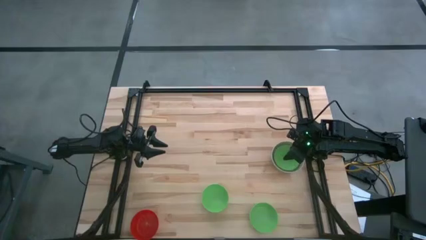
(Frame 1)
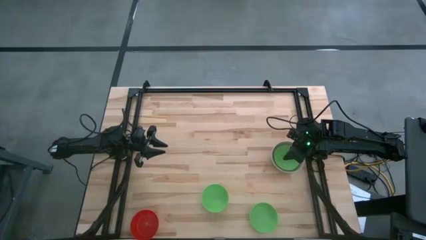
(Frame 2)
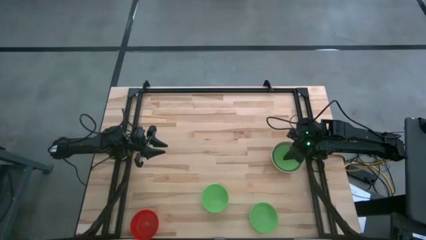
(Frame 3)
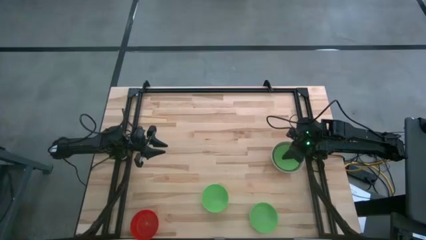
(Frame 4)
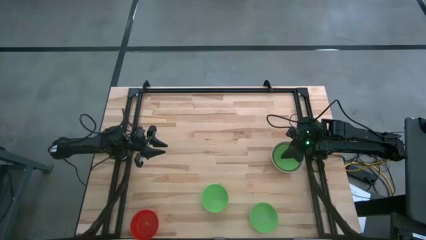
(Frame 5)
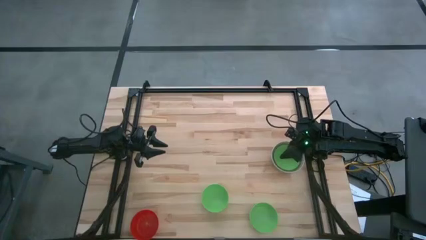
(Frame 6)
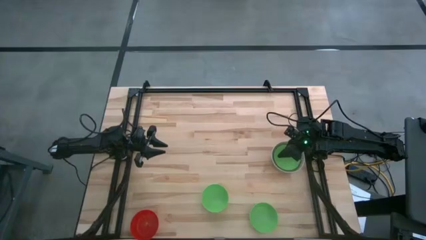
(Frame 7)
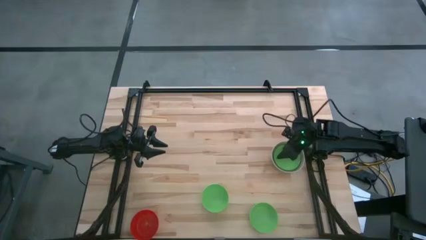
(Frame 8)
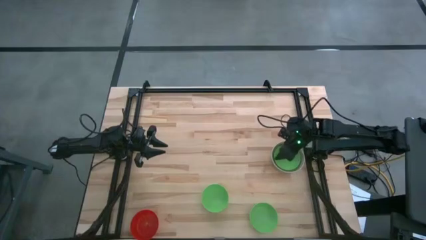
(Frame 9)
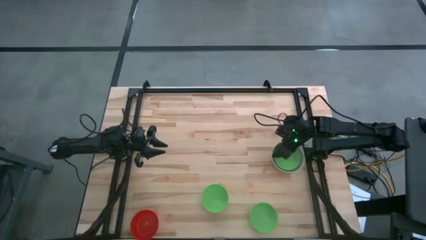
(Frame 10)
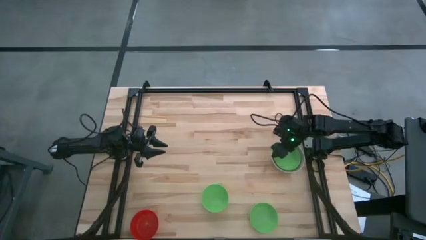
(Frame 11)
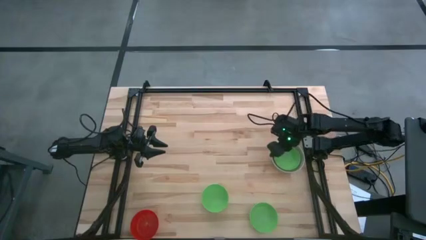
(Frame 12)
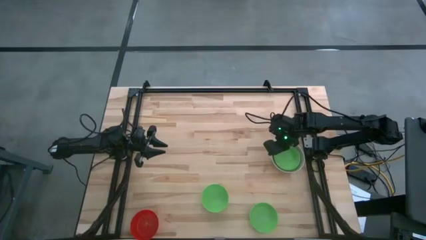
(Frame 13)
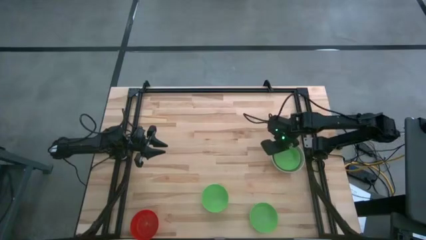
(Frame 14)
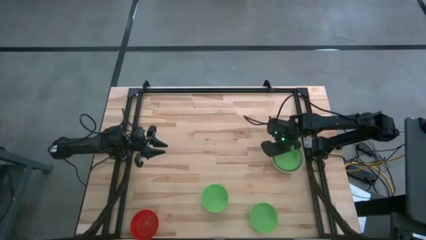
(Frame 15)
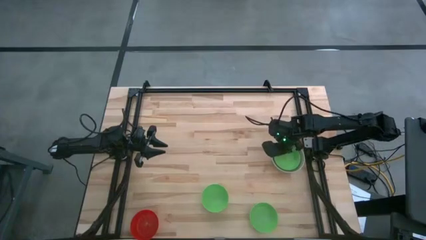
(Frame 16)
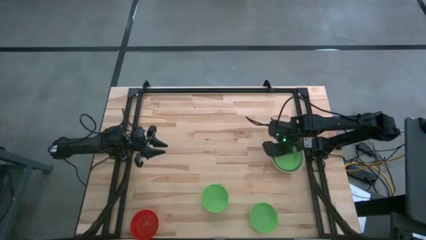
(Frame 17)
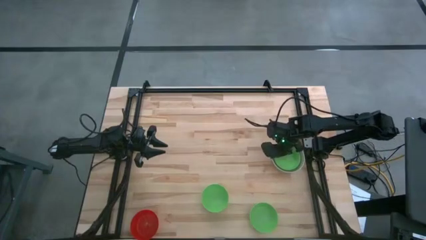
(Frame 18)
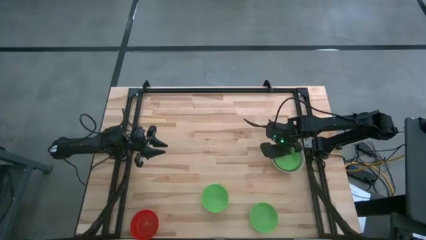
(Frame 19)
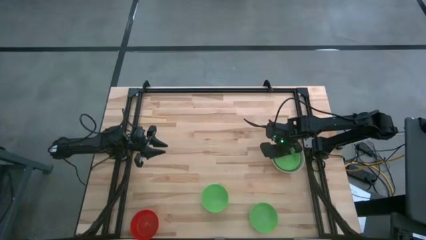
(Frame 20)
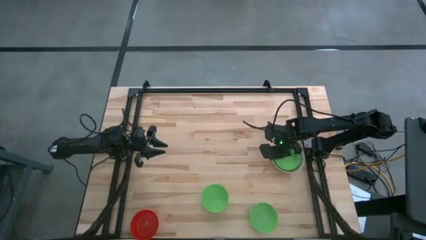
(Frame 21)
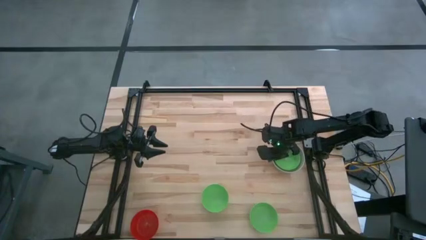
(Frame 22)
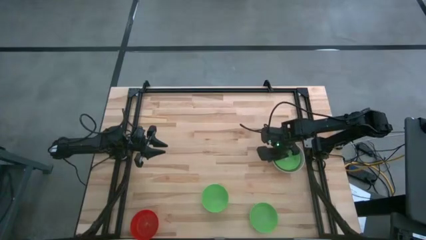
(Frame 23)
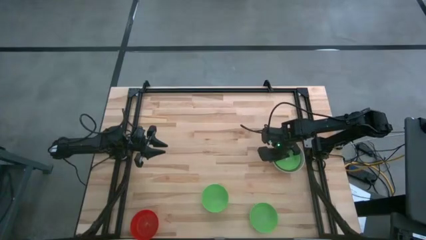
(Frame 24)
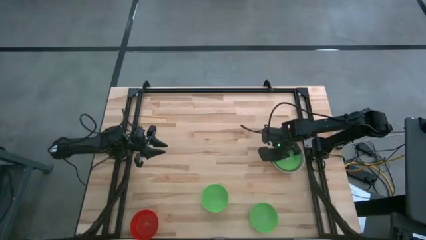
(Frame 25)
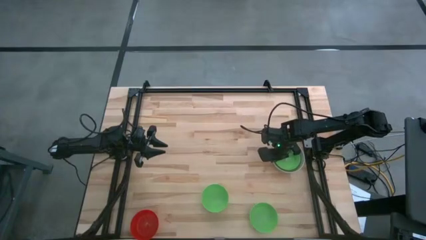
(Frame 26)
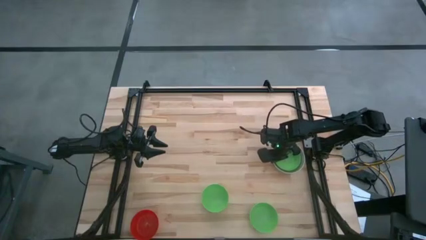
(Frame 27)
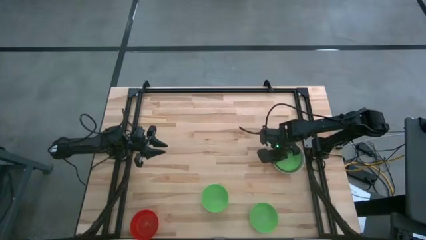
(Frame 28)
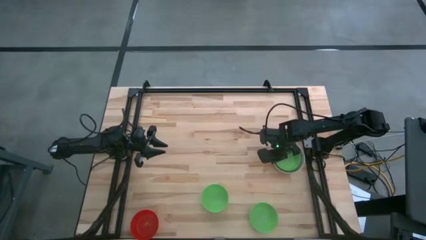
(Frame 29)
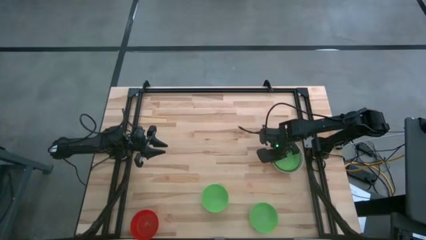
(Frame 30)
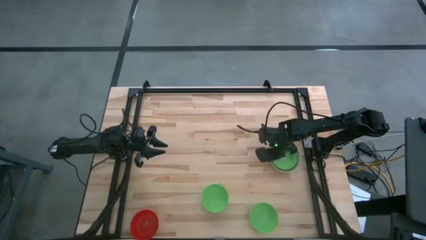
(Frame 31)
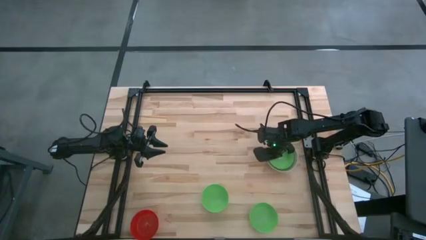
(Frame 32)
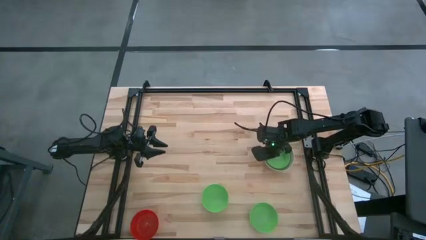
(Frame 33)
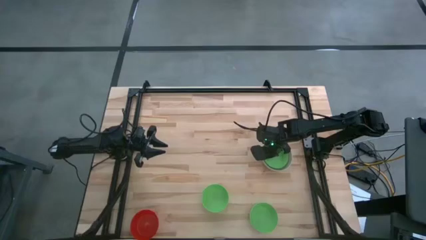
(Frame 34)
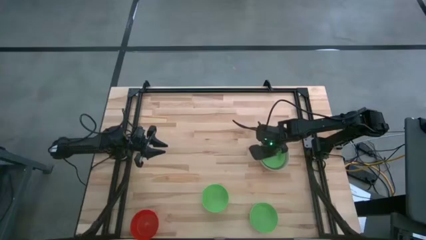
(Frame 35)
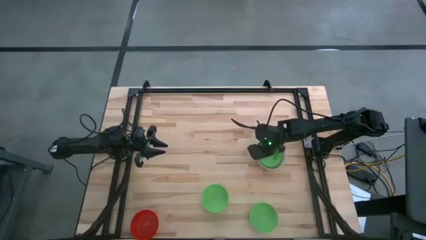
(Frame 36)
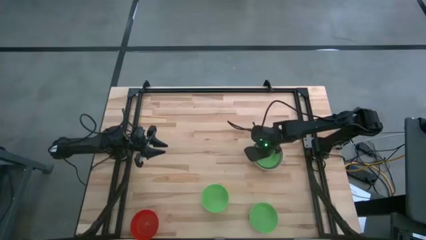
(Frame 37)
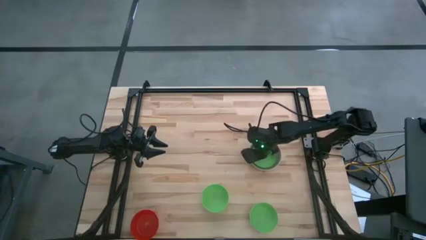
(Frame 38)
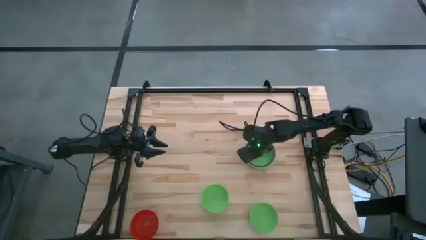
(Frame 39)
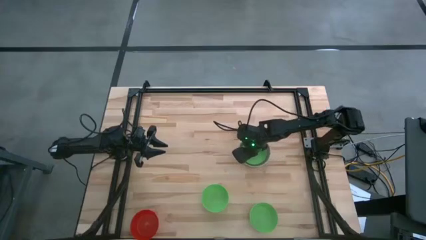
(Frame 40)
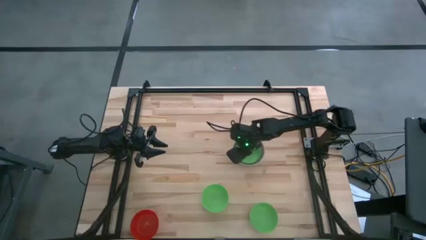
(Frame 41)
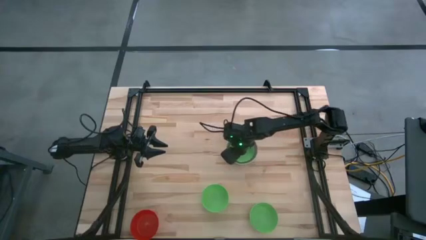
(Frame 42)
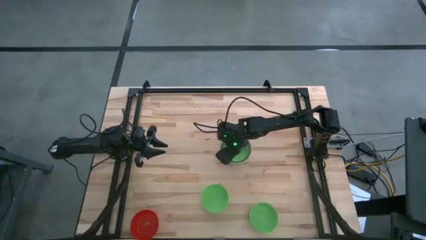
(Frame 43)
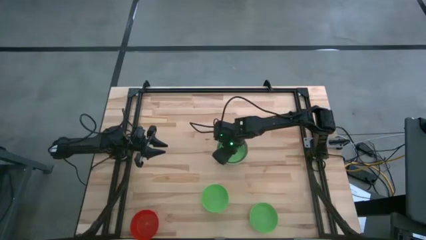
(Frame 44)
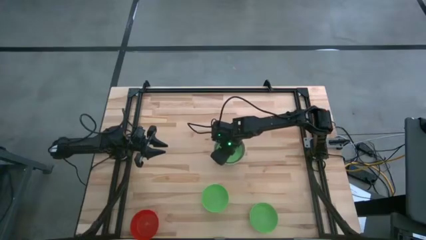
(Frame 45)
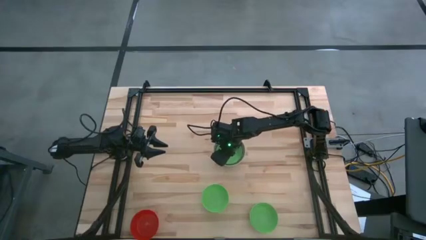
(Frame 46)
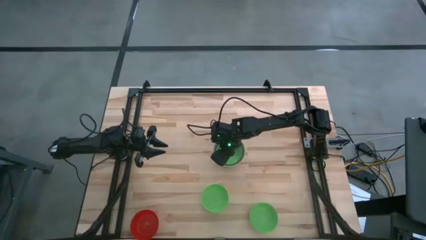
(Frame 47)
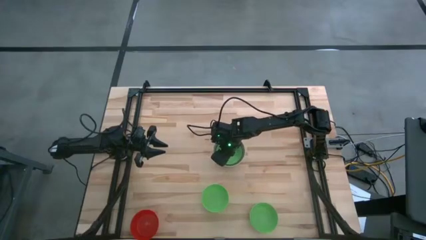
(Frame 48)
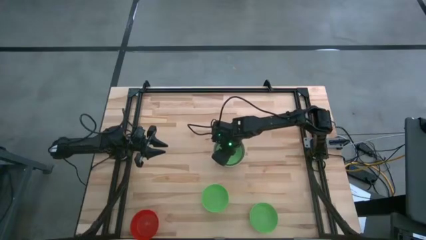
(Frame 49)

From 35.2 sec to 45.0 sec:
Move the stacked bowl to the center of the table

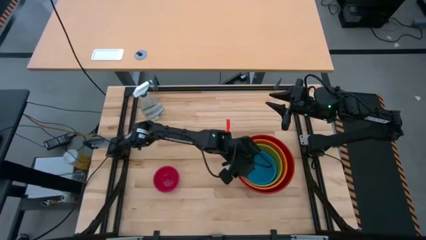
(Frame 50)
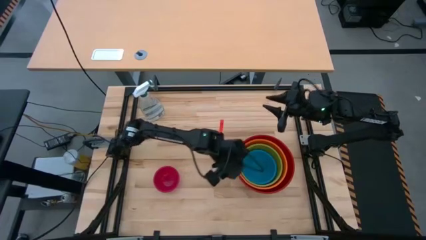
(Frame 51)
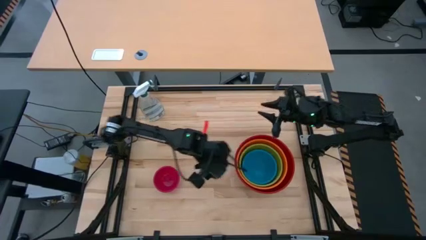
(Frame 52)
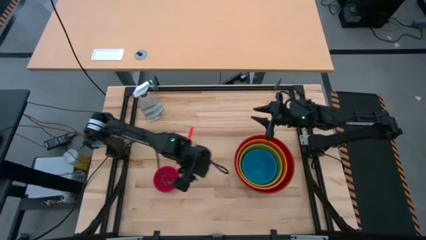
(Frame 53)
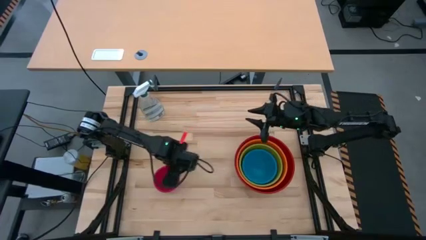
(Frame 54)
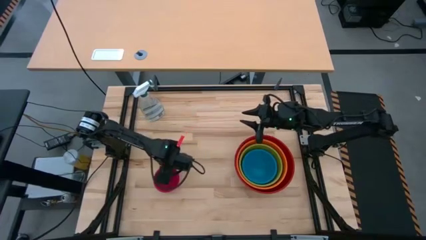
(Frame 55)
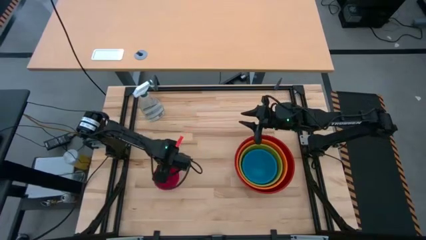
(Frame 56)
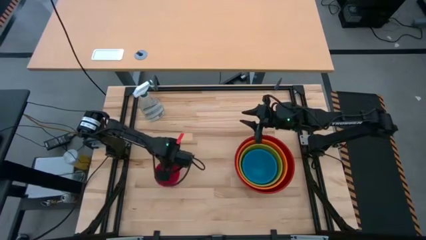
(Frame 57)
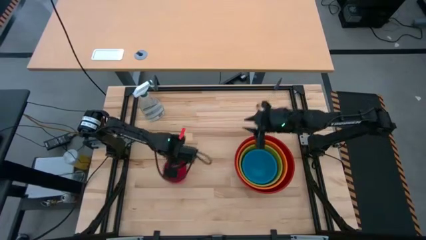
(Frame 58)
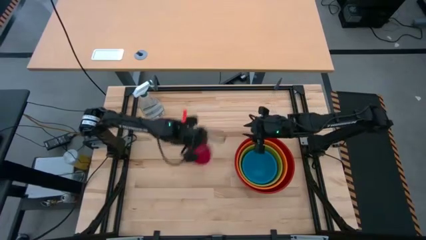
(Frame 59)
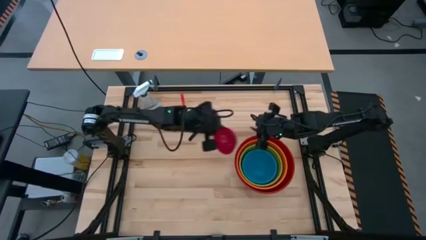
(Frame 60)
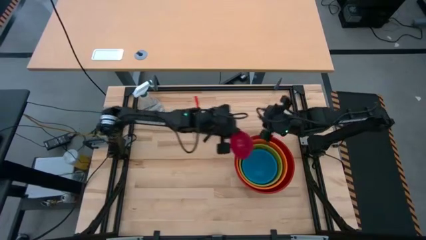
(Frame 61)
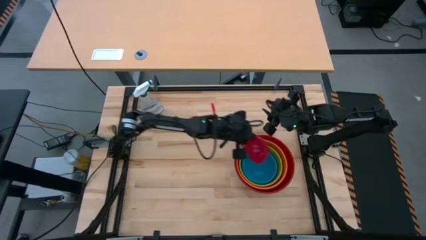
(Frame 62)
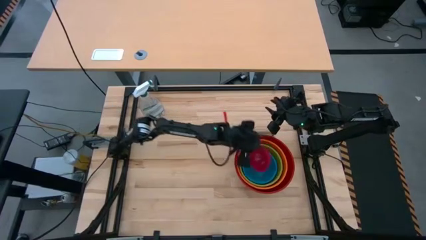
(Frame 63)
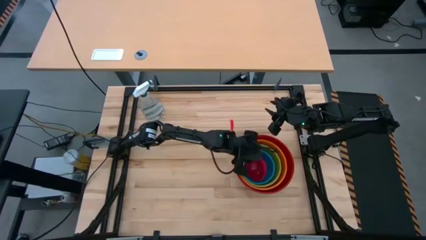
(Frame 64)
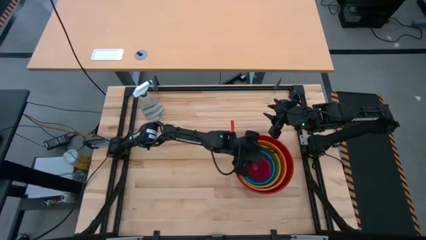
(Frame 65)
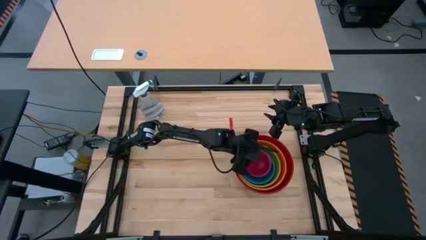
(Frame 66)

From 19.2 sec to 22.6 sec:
Stack the light red bowl on top of the blue bowl

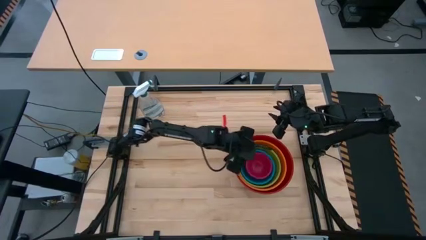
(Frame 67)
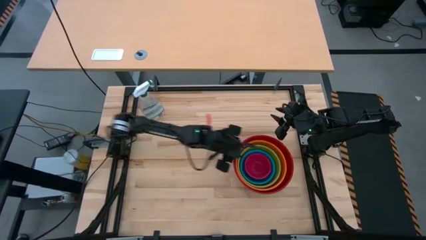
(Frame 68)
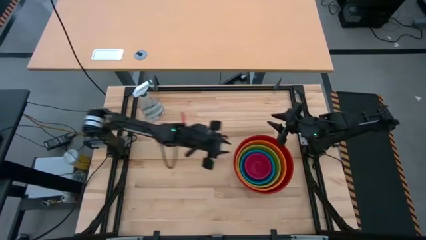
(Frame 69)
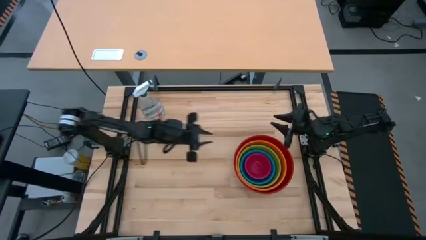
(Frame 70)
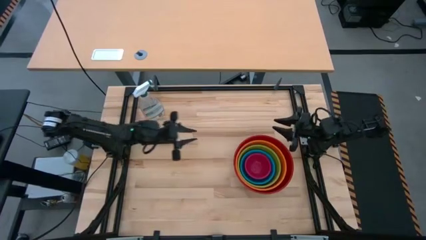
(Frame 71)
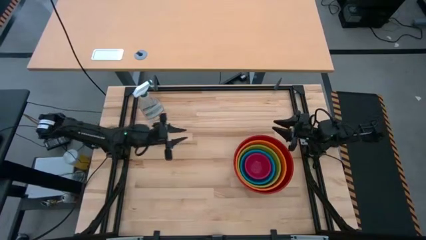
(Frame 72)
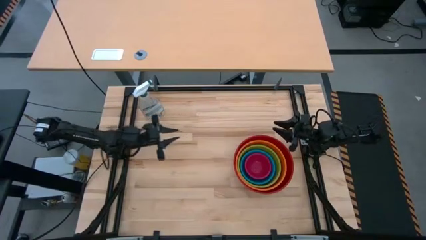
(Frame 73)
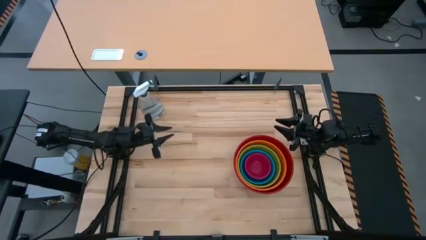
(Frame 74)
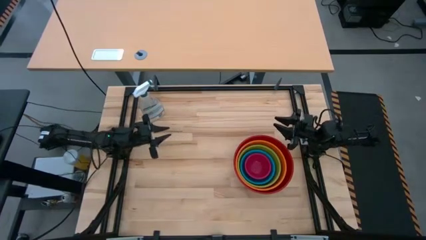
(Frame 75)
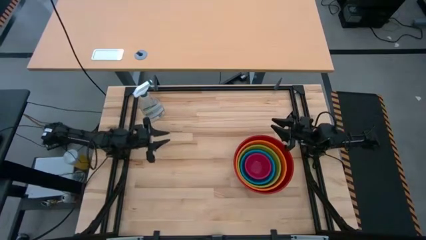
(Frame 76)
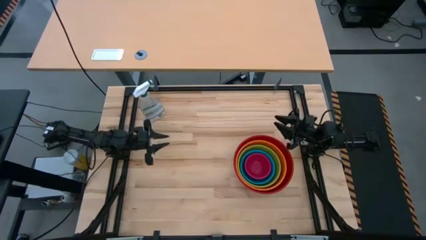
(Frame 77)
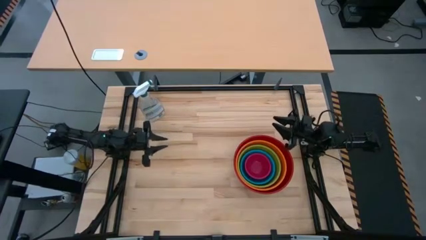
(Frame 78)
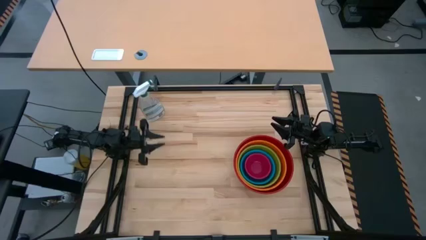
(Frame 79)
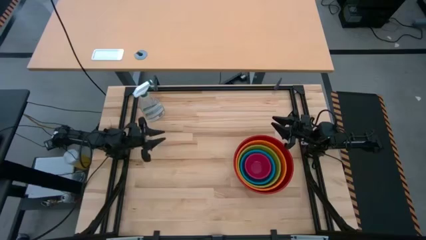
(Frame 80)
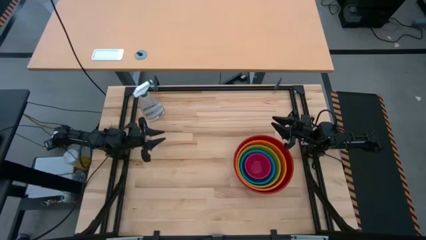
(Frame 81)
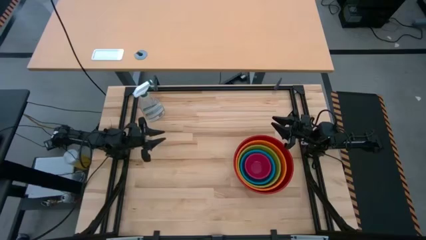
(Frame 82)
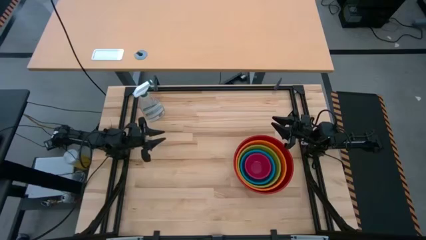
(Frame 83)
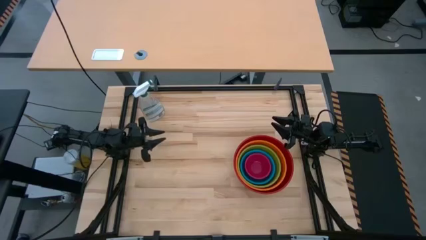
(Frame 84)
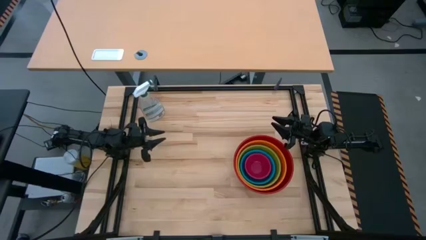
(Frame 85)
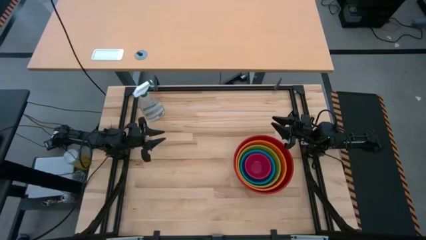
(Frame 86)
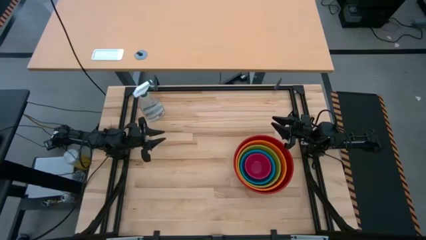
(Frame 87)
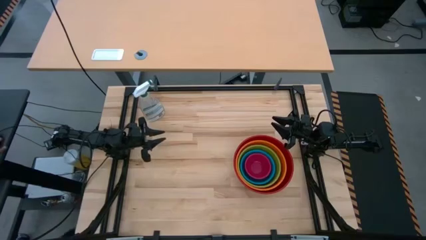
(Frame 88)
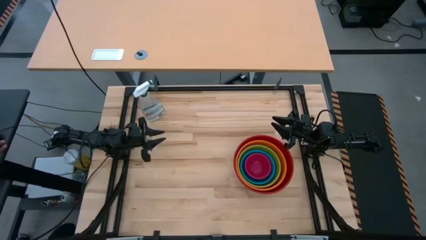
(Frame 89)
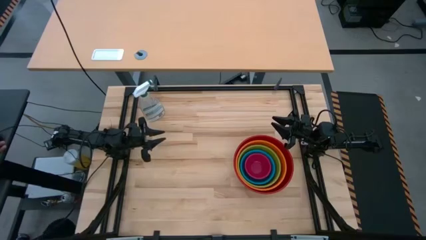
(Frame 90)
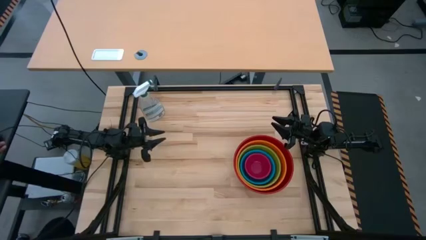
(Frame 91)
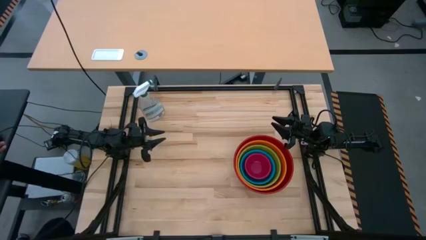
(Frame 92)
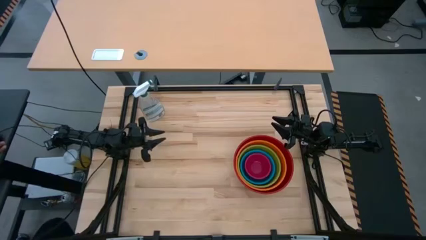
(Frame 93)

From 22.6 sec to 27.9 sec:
Return to Home Position
